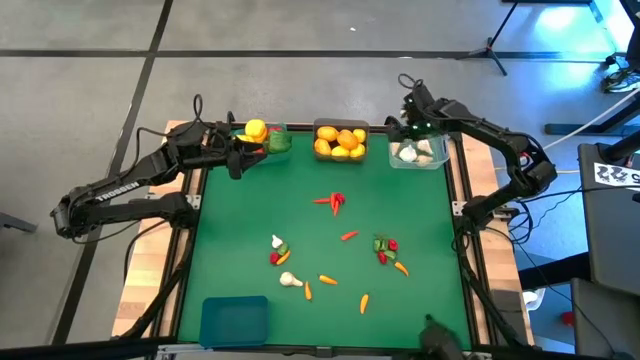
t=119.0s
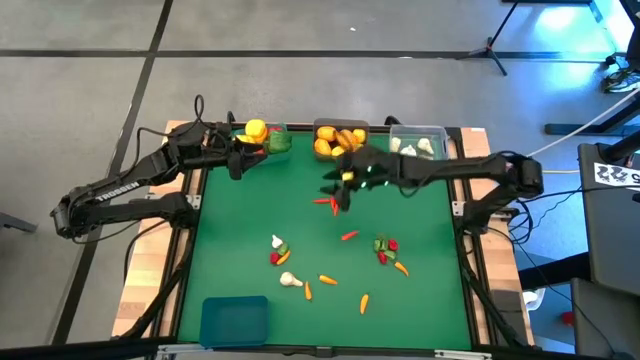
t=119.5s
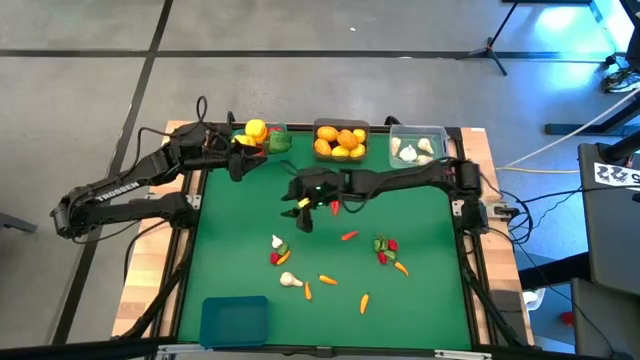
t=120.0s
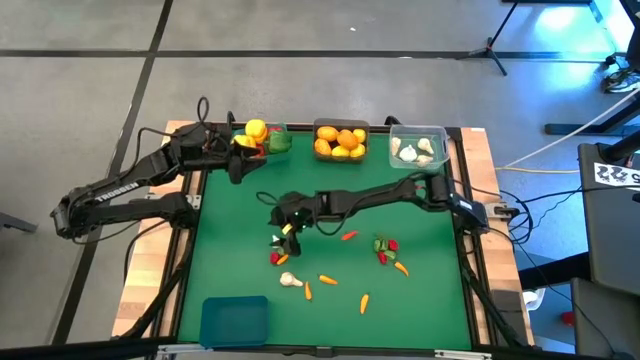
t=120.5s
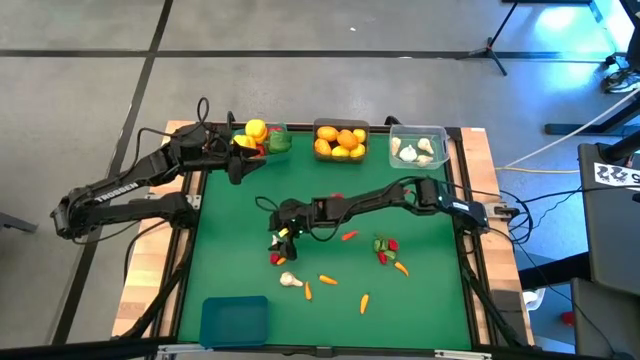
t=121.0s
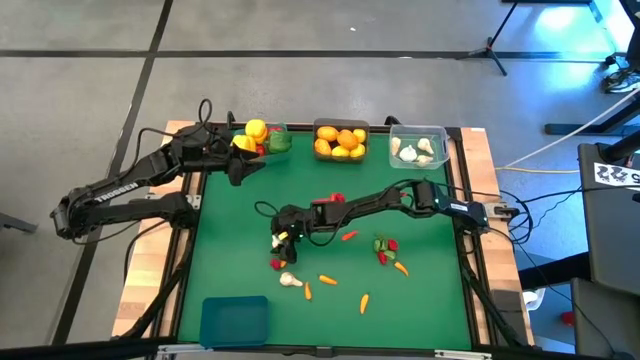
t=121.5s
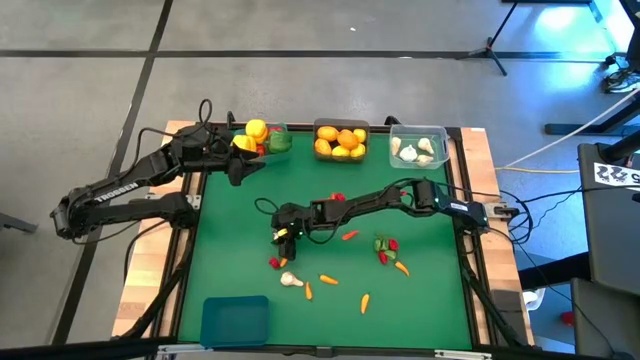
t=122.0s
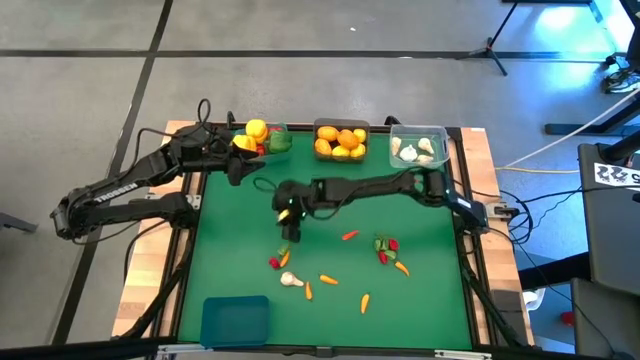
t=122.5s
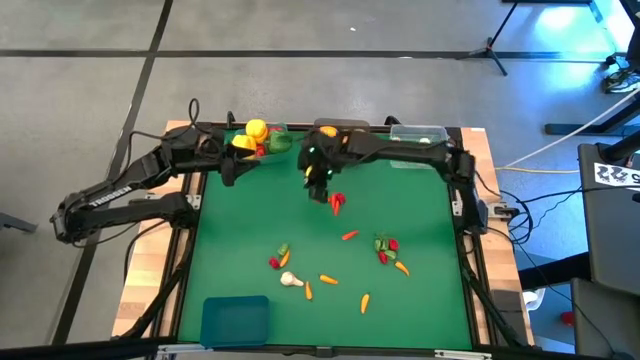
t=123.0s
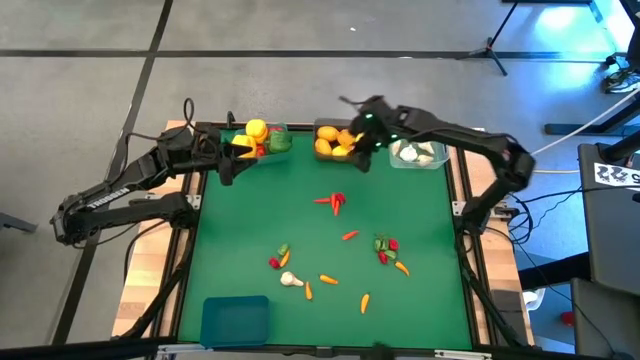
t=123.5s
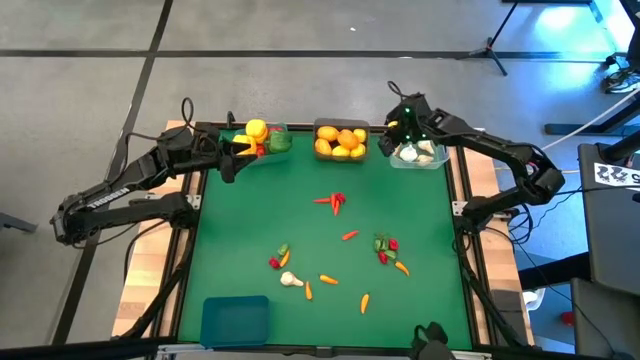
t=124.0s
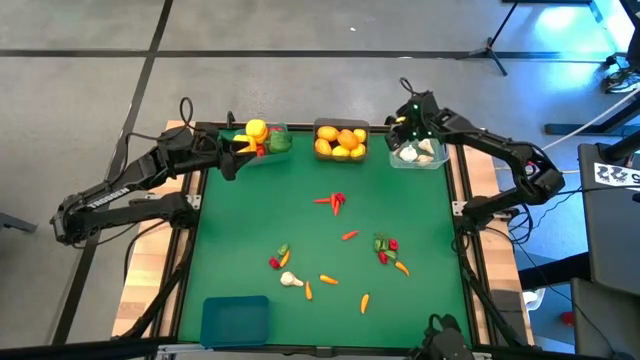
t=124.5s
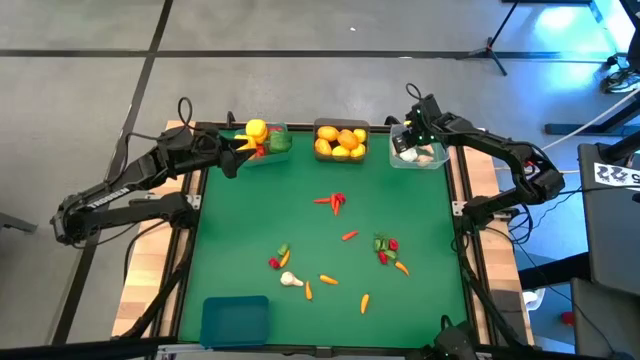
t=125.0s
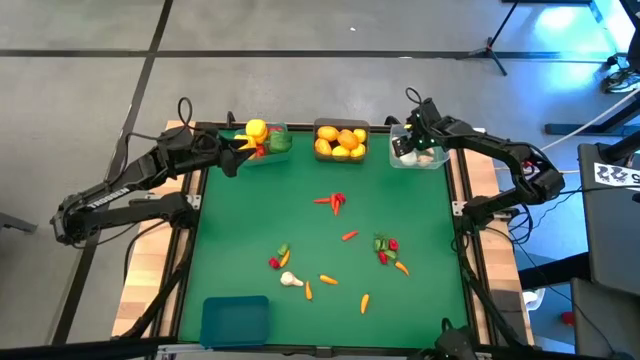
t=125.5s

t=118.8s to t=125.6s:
Task: Sort produce into baskets
Put the white garlic into the transparent bin

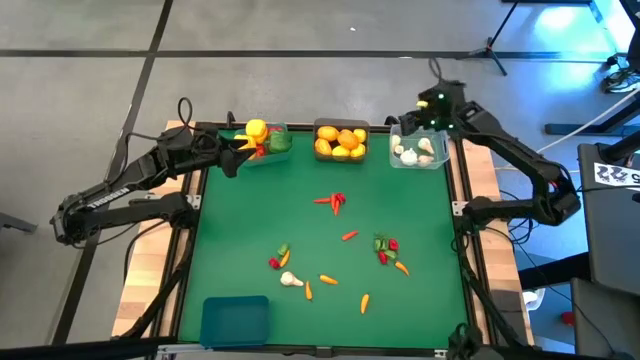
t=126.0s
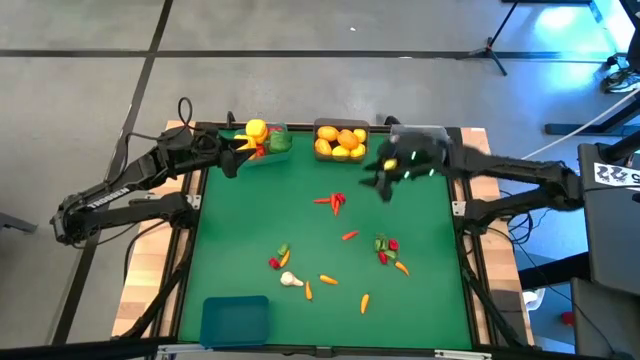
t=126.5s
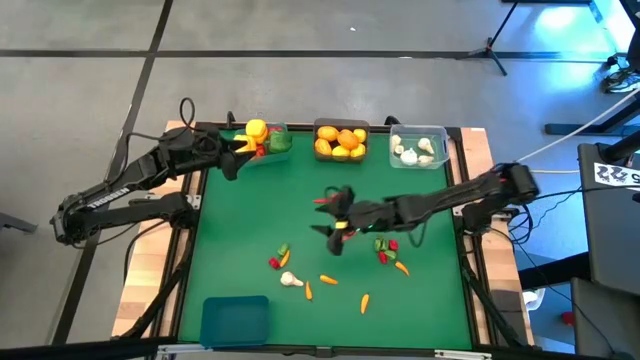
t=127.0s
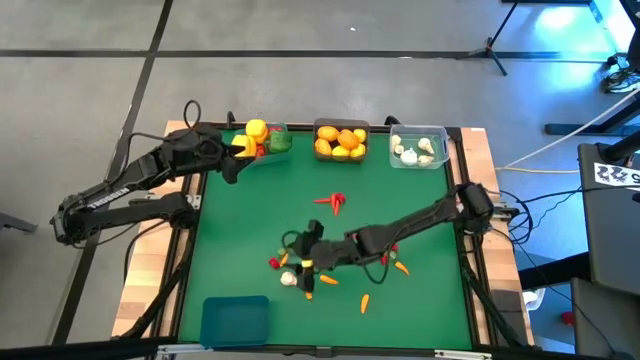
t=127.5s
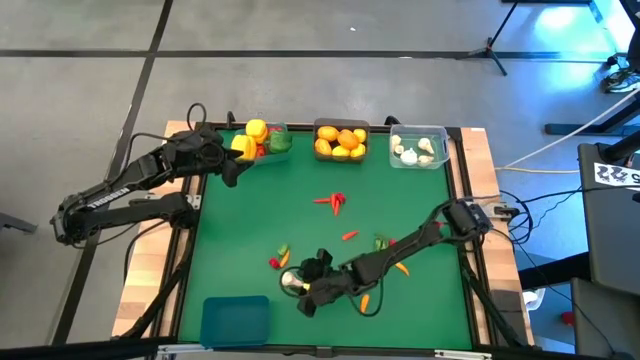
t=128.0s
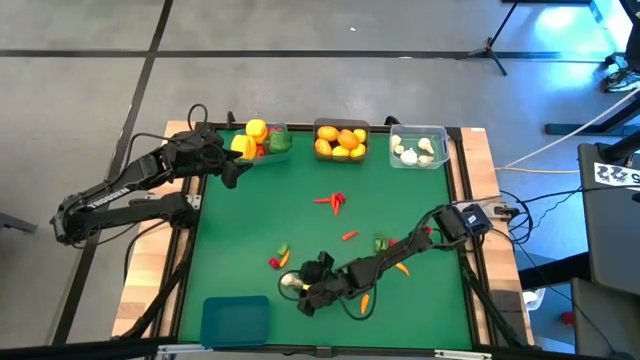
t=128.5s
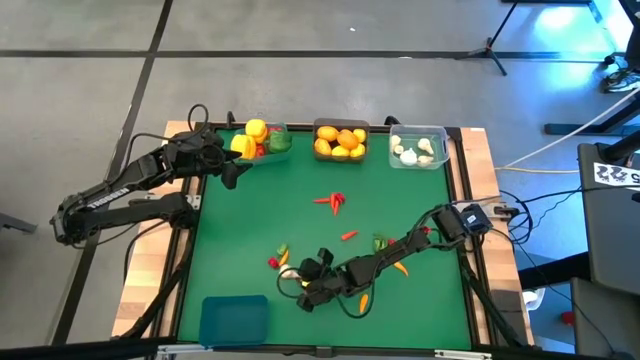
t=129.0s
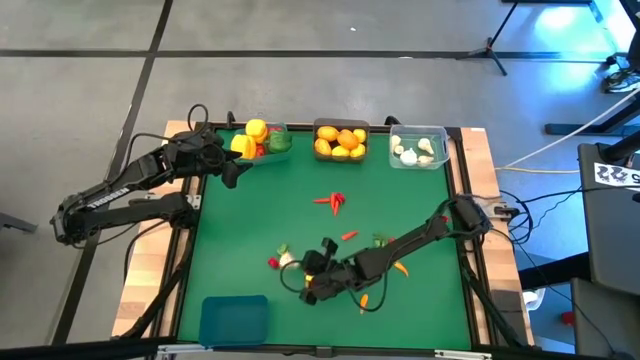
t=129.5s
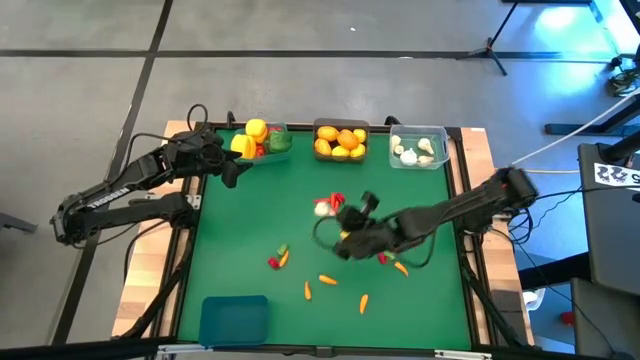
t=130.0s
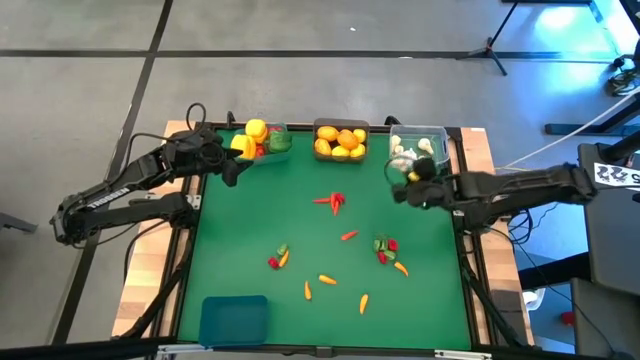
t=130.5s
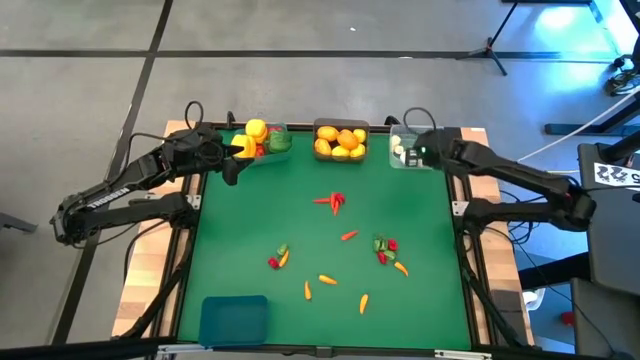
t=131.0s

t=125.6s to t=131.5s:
Put the white garlic into the transparent bin

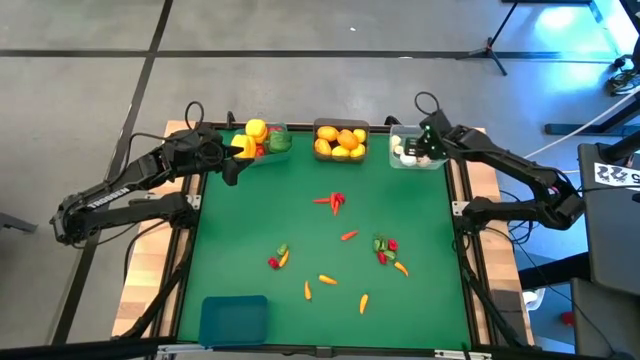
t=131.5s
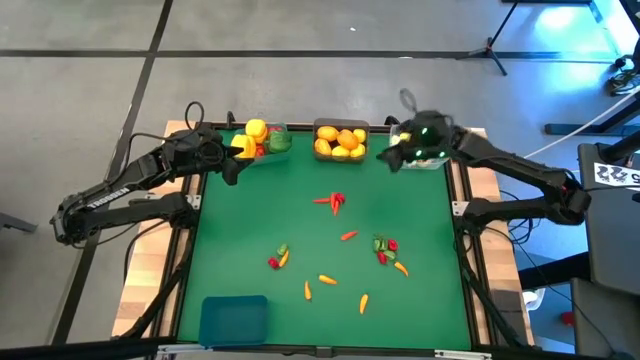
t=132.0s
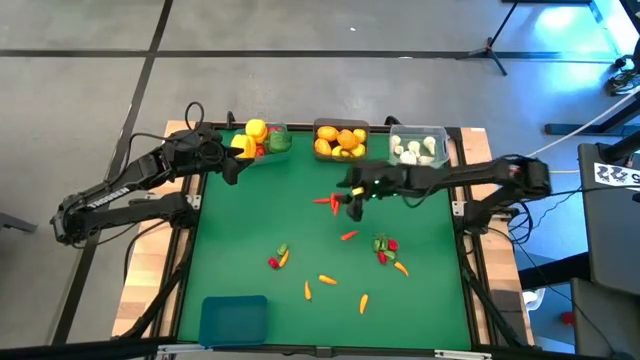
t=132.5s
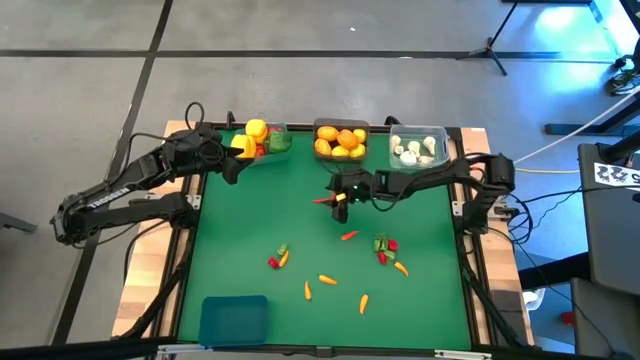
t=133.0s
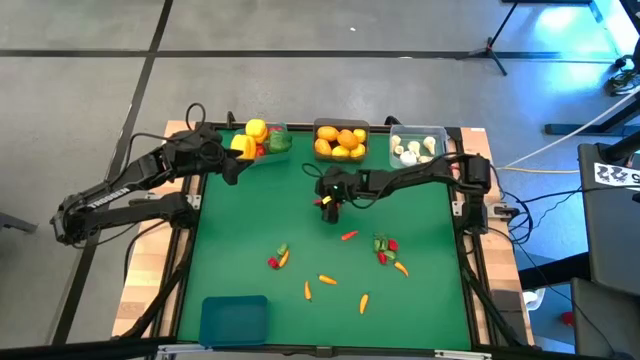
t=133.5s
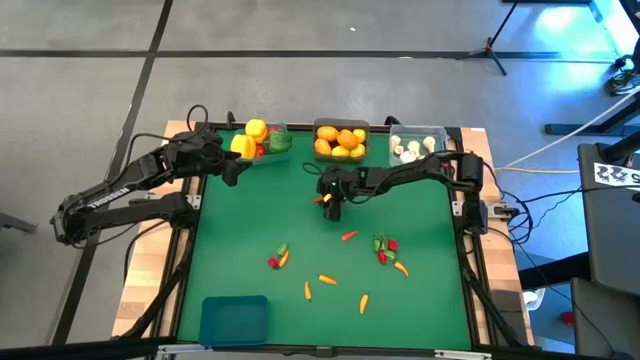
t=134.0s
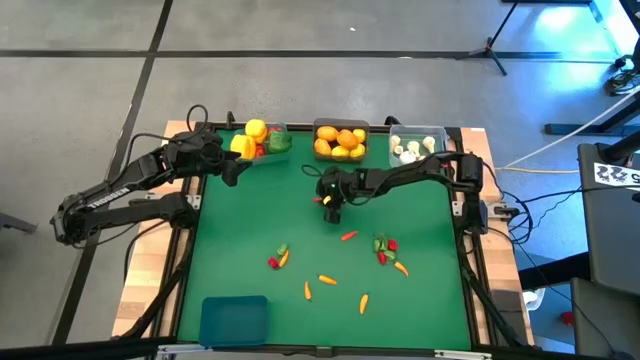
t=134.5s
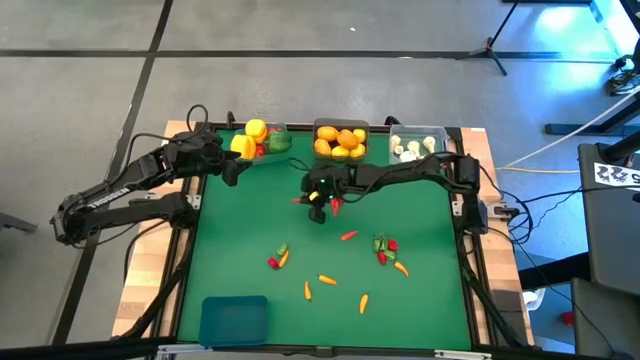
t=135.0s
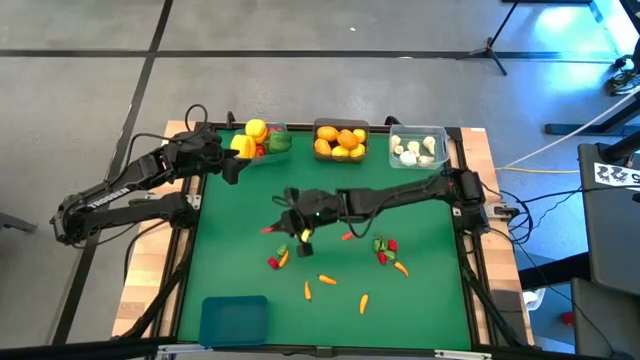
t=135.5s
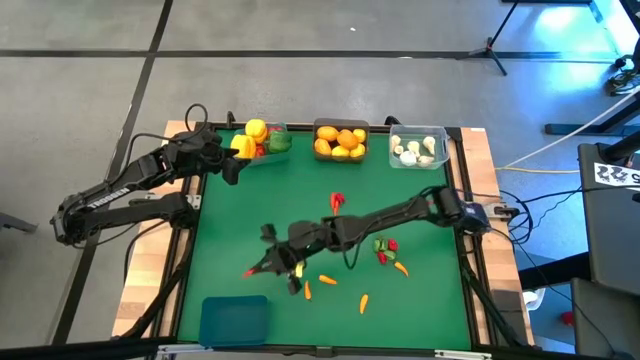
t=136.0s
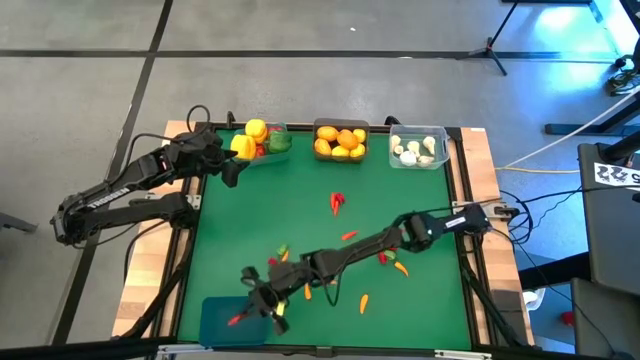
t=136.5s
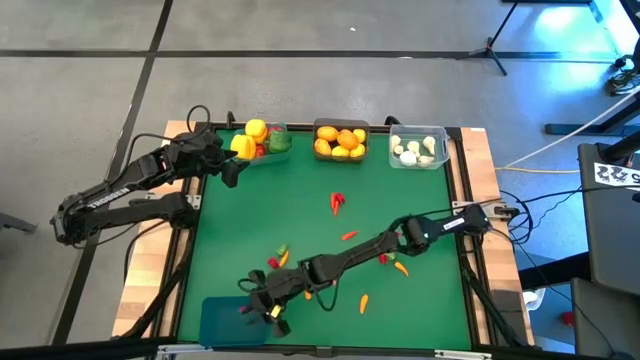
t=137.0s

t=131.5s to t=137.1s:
Put the orange chili into the dark blue bin

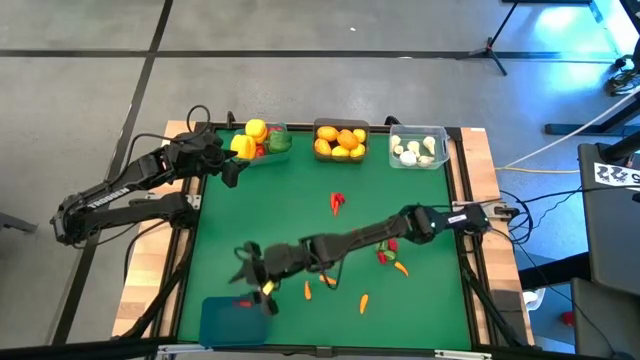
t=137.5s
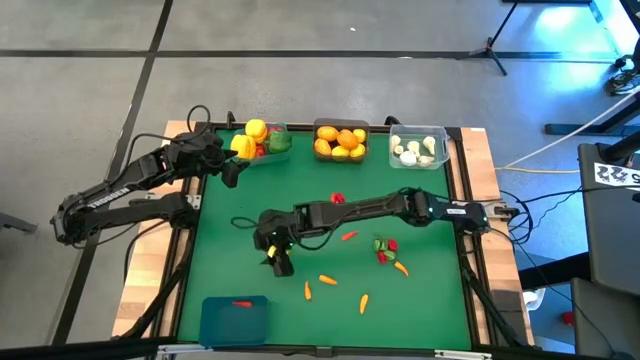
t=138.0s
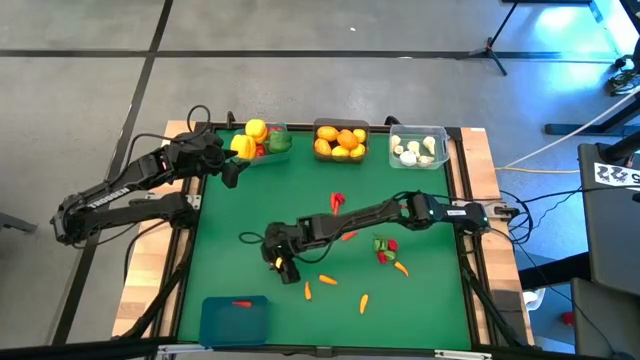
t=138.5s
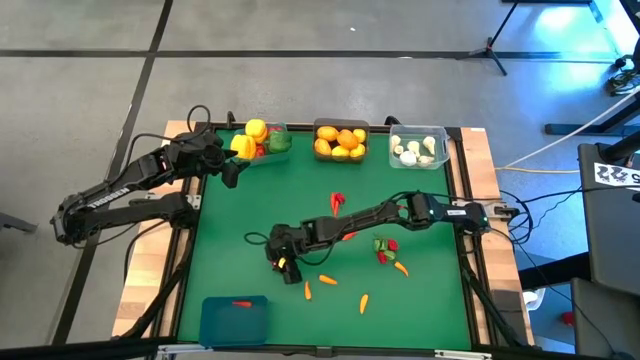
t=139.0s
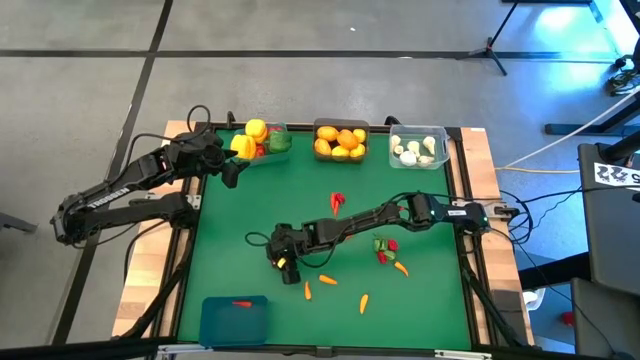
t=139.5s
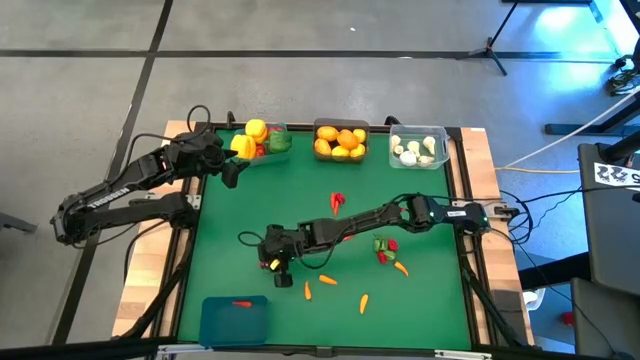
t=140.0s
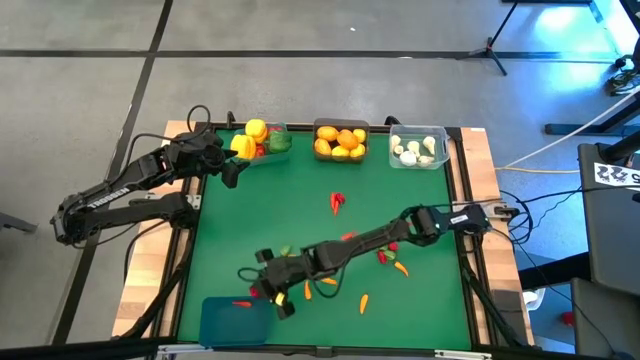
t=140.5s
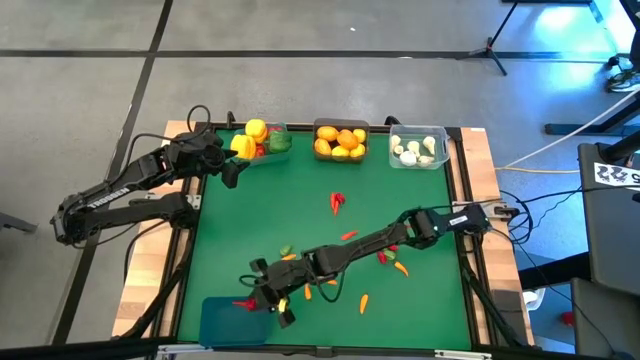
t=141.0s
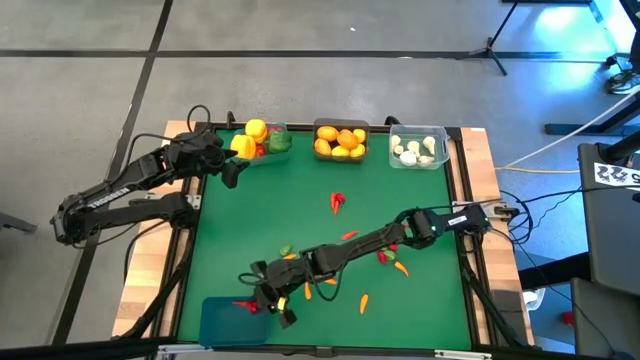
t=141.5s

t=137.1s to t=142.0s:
Put the red chili pepper into the blue bin
